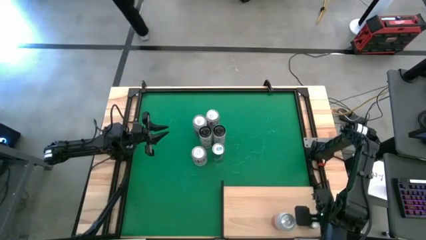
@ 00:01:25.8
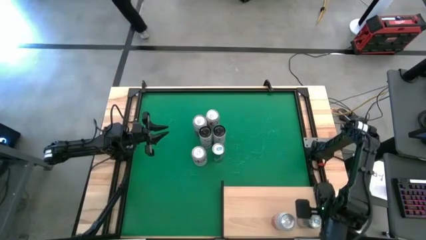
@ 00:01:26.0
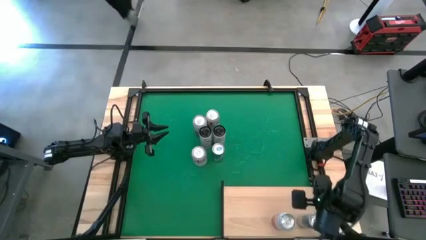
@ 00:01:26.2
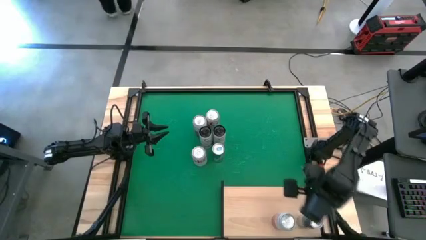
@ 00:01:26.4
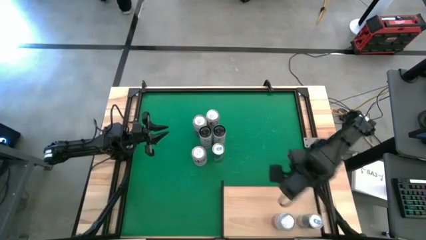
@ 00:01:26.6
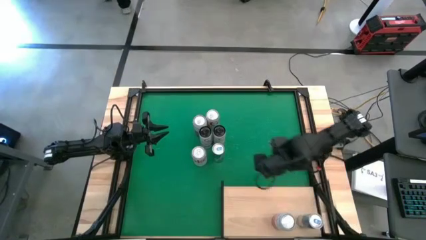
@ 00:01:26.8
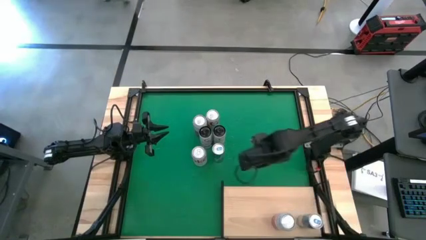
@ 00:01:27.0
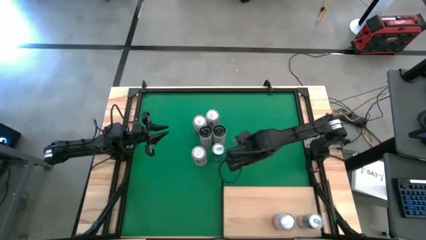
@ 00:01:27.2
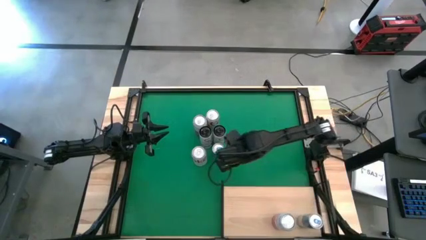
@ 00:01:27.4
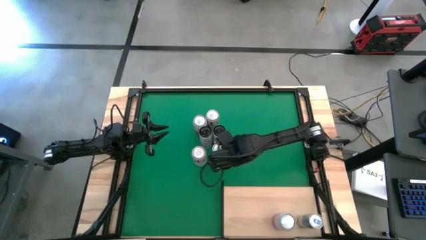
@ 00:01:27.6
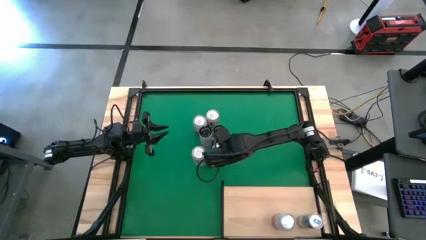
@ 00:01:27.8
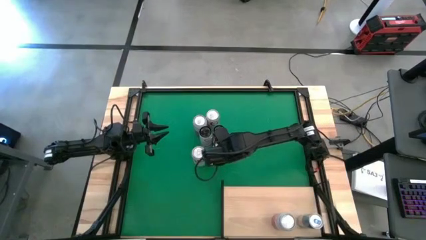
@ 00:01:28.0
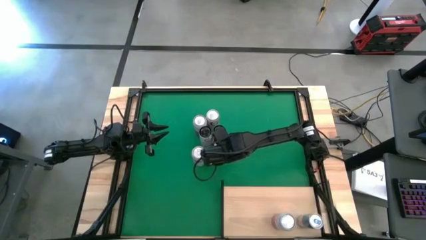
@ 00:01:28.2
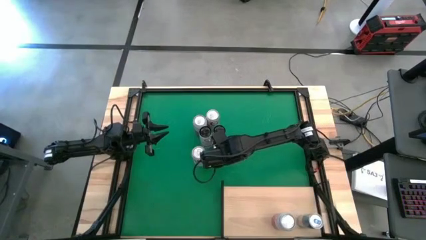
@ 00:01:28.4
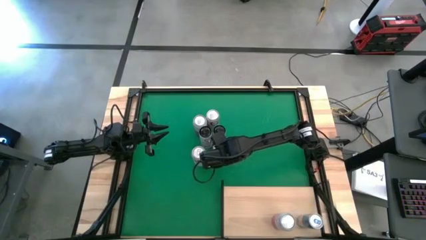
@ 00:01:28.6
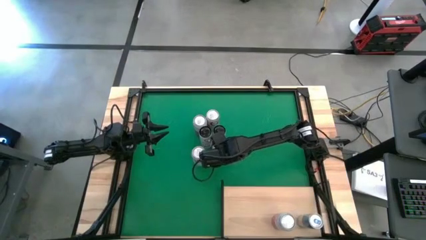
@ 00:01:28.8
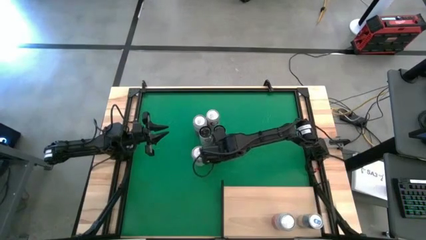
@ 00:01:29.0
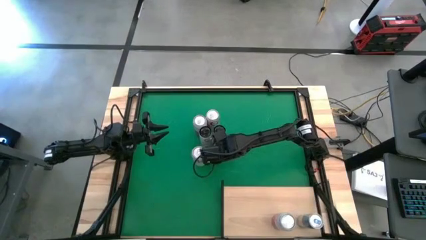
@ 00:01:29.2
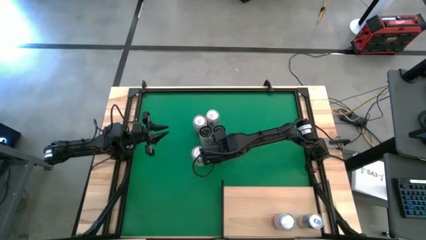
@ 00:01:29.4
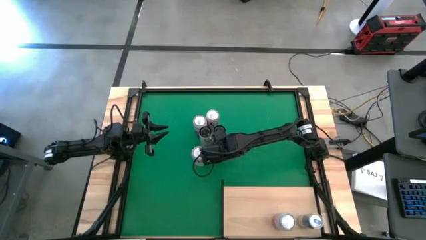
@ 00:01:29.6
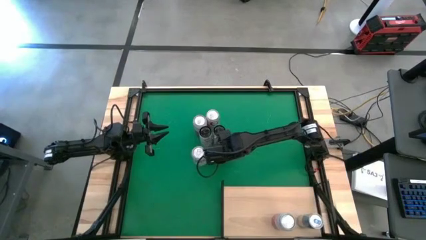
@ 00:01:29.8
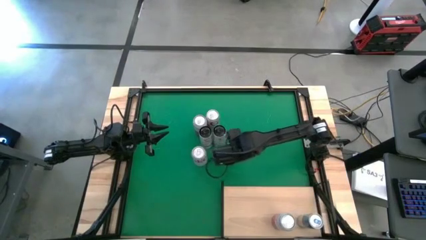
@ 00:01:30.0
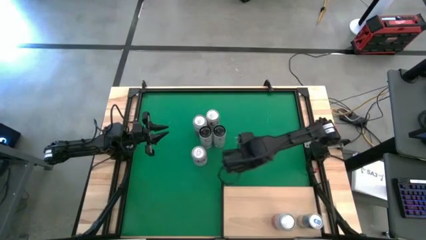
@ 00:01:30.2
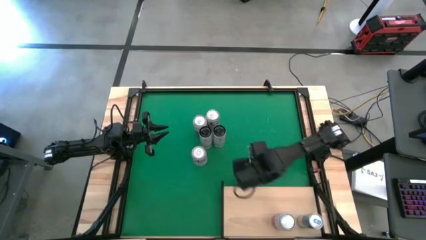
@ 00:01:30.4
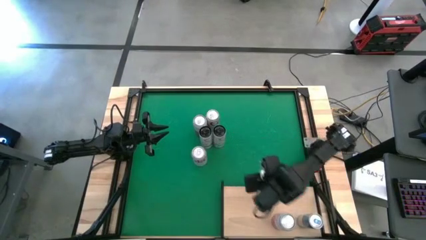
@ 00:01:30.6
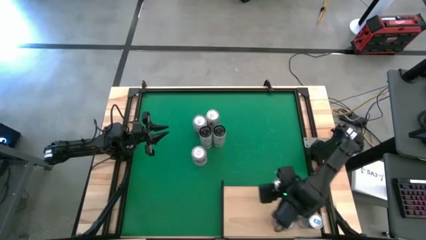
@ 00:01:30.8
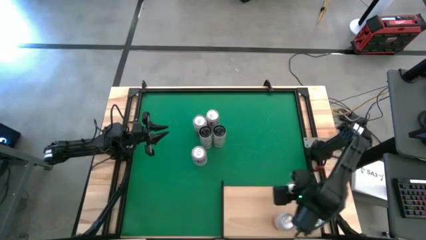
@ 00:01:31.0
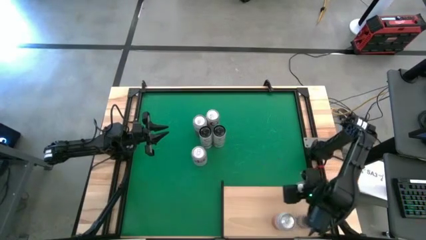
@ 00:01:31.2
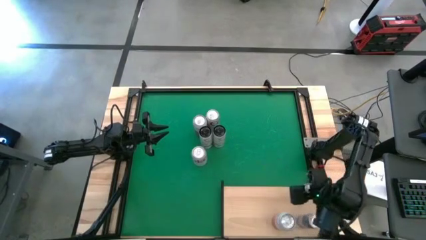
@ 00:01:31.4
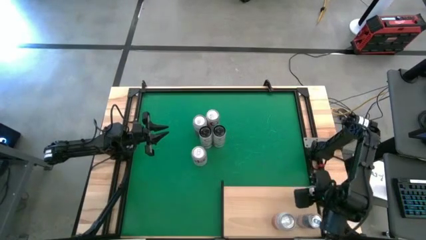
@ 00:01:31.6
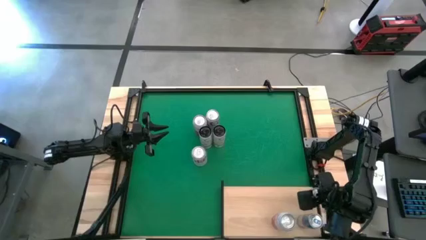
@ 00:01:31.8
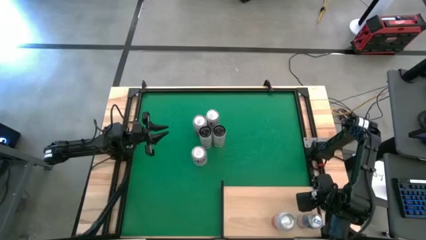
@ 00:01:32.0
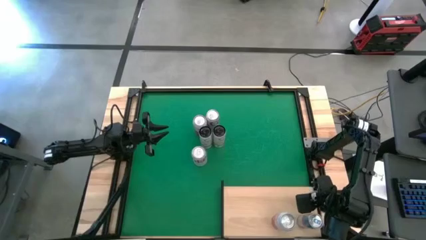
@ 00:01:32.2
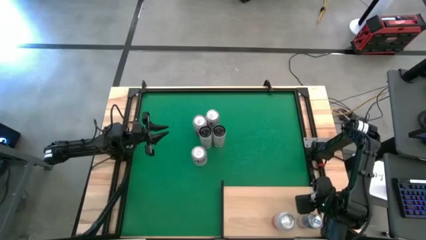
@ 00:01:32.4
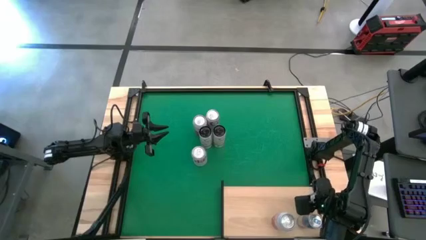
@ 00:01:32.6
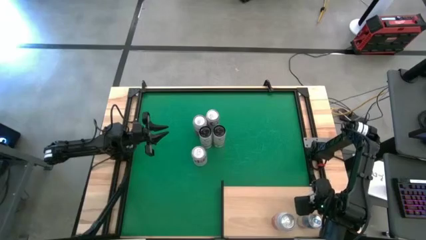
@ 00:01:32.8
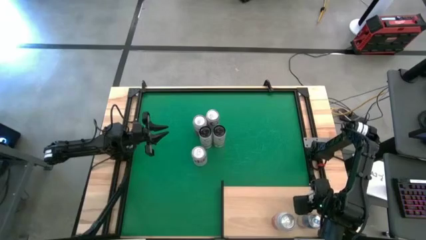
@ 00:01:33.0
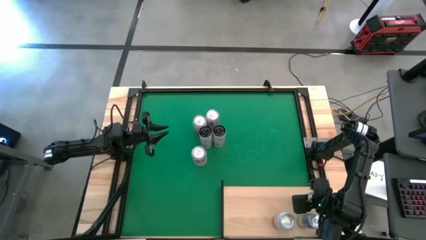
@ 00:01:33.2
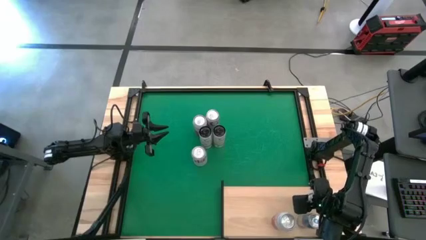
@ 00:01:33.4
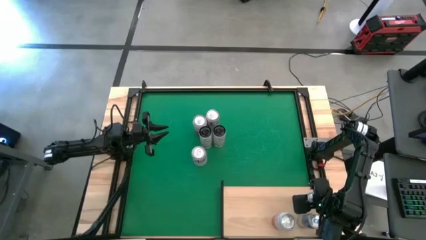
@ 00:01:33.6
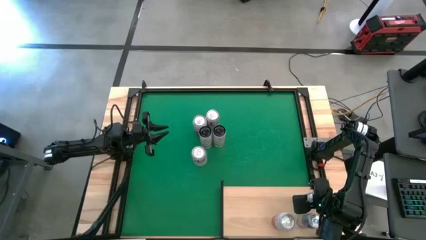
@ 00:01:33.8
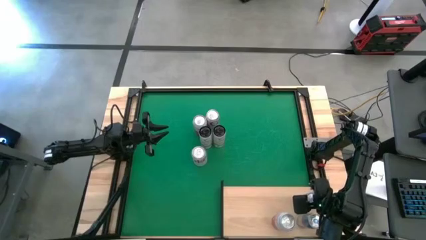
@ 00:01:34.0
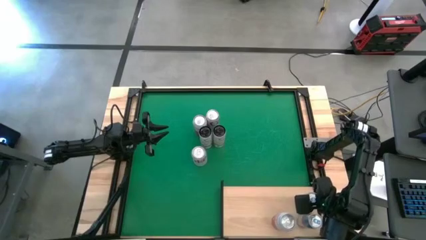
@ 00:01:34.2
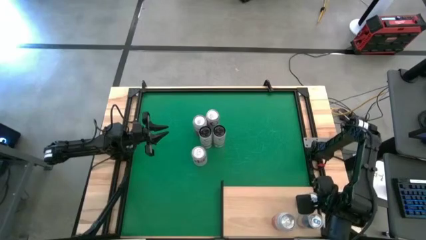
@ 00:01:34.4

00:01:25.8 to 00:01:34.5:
Task: Place canned beverage on shelf
Put the blue soda can on the shelf aligned with the other blue soda can

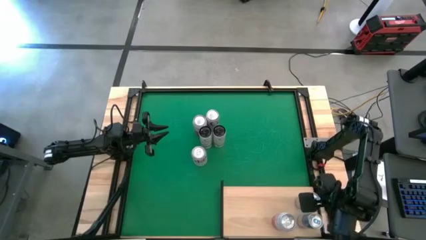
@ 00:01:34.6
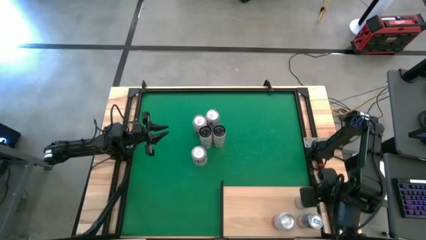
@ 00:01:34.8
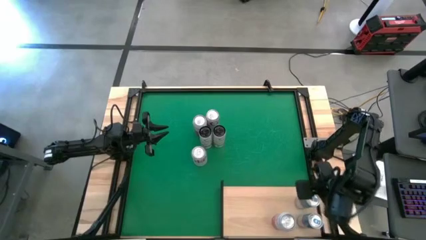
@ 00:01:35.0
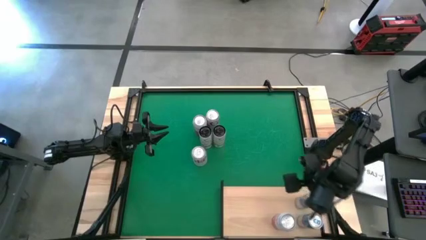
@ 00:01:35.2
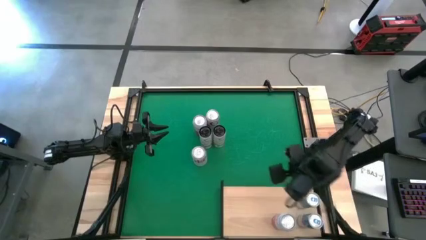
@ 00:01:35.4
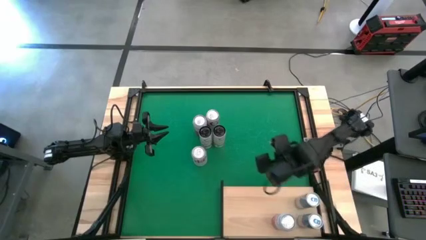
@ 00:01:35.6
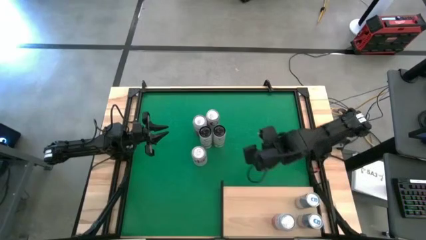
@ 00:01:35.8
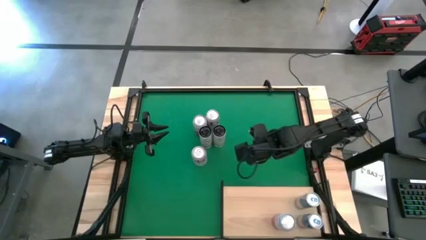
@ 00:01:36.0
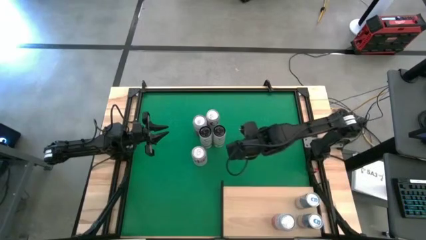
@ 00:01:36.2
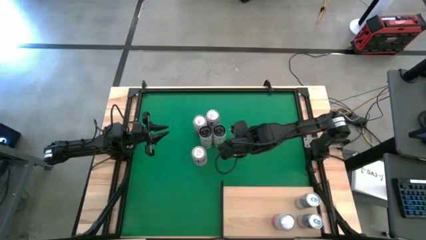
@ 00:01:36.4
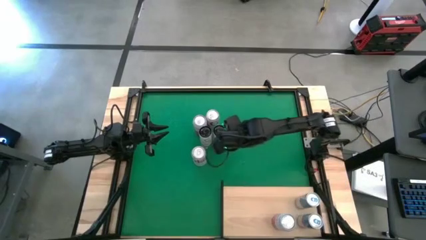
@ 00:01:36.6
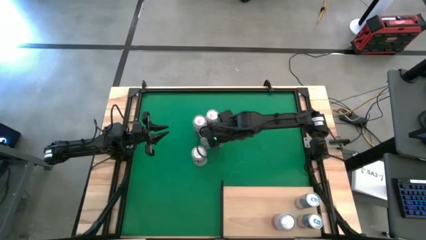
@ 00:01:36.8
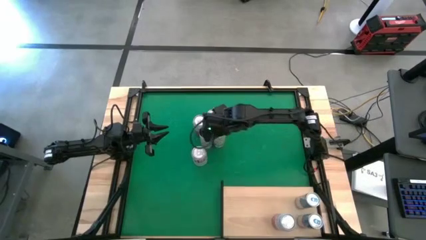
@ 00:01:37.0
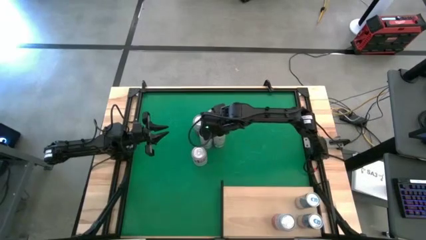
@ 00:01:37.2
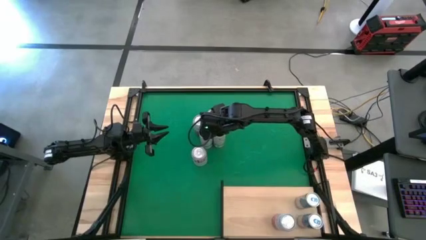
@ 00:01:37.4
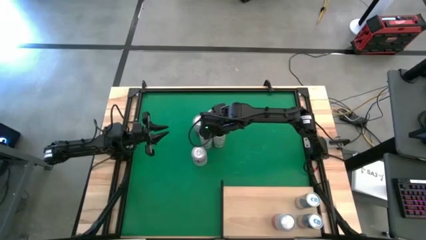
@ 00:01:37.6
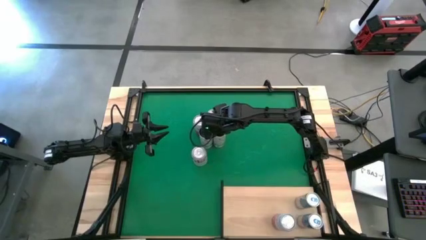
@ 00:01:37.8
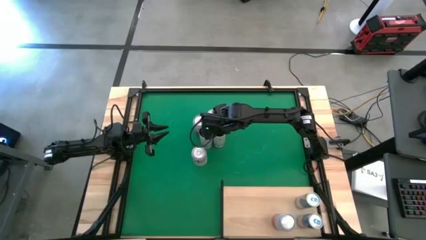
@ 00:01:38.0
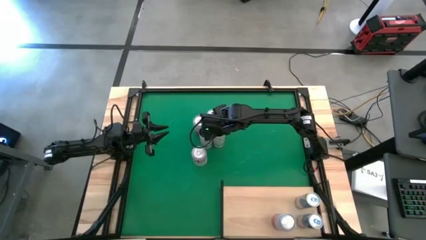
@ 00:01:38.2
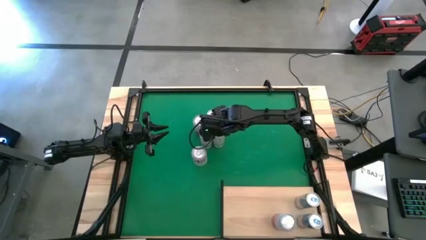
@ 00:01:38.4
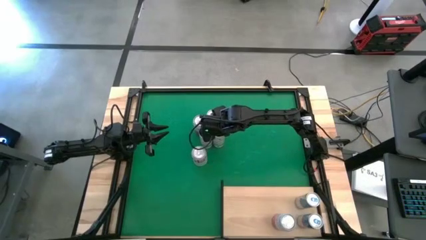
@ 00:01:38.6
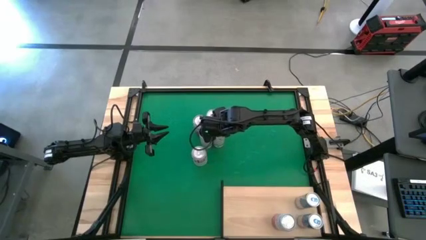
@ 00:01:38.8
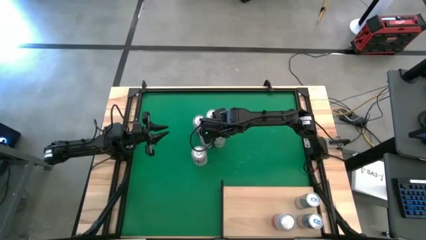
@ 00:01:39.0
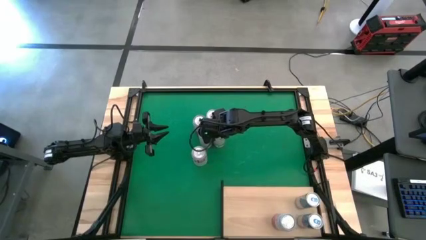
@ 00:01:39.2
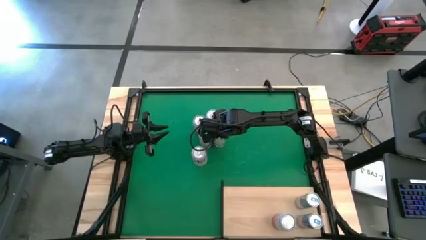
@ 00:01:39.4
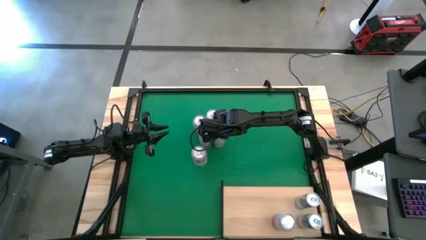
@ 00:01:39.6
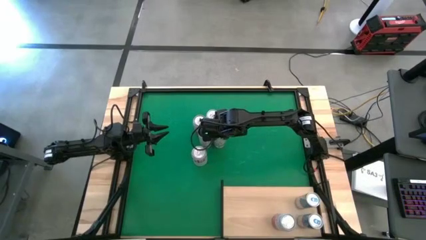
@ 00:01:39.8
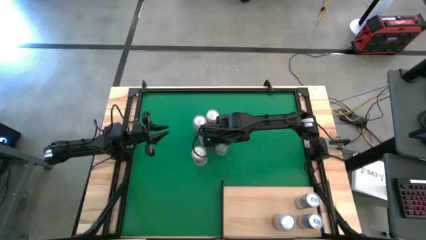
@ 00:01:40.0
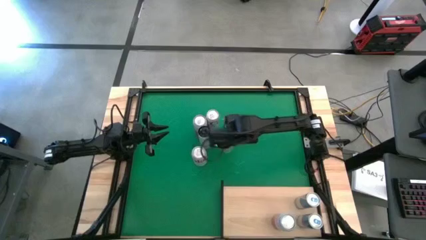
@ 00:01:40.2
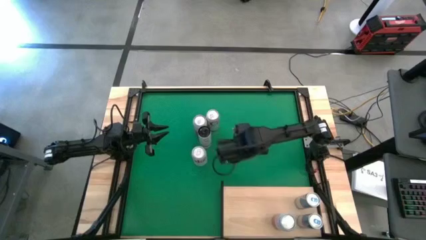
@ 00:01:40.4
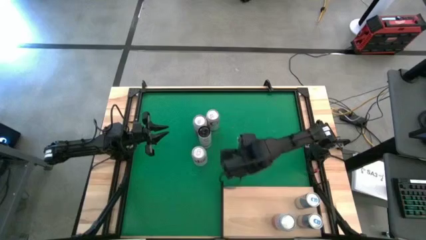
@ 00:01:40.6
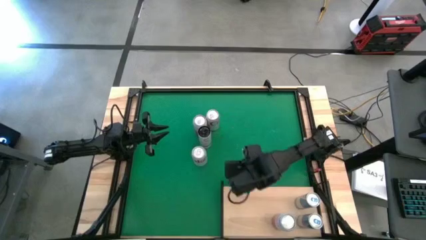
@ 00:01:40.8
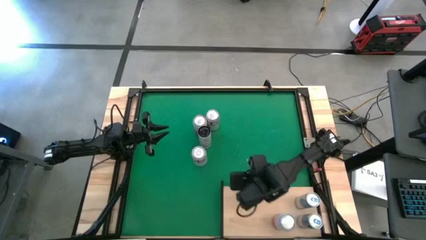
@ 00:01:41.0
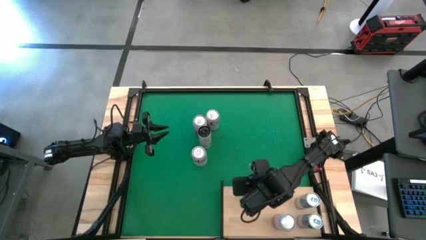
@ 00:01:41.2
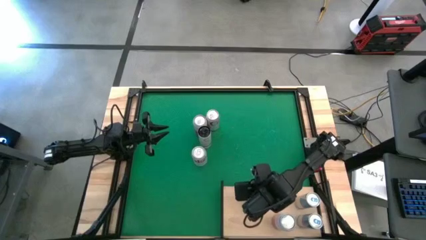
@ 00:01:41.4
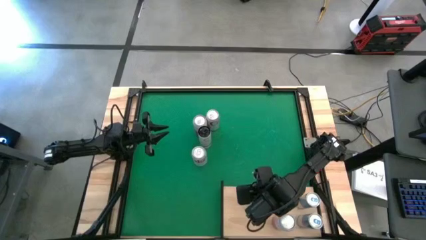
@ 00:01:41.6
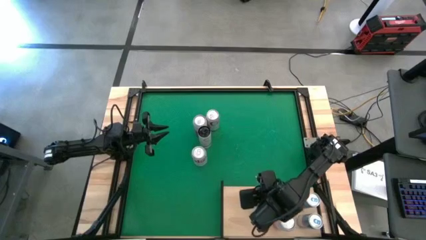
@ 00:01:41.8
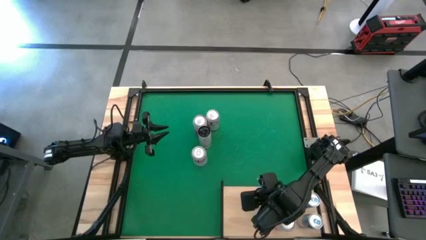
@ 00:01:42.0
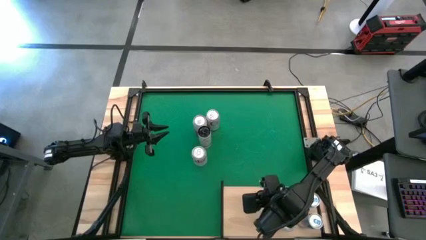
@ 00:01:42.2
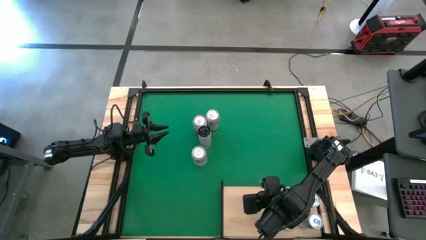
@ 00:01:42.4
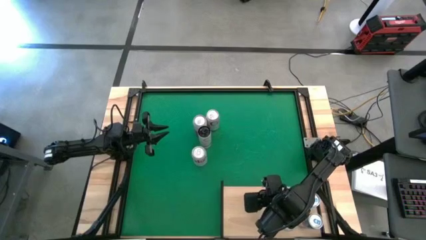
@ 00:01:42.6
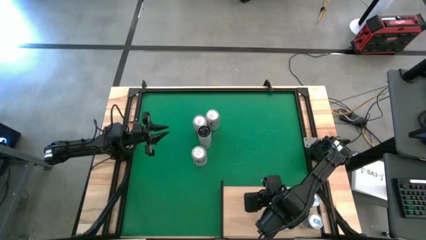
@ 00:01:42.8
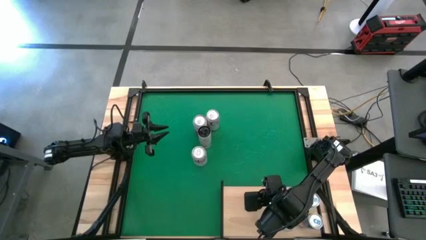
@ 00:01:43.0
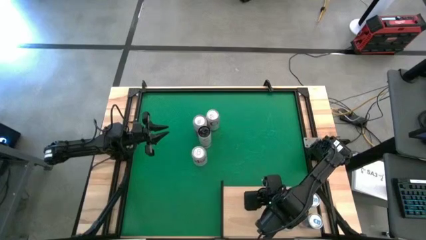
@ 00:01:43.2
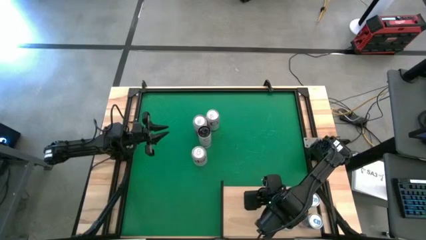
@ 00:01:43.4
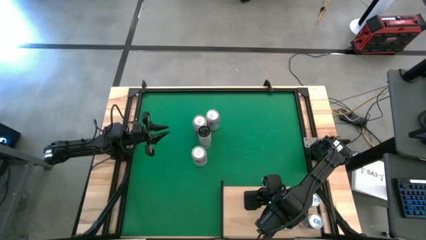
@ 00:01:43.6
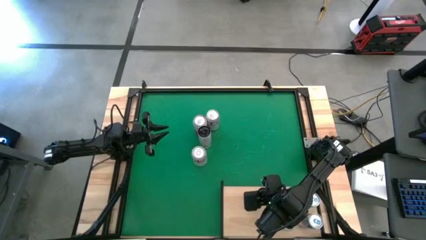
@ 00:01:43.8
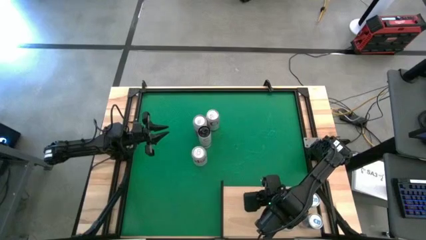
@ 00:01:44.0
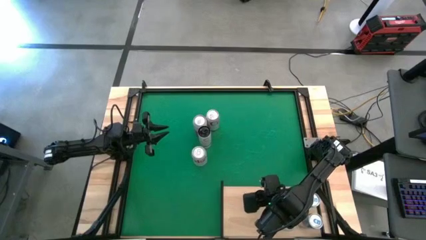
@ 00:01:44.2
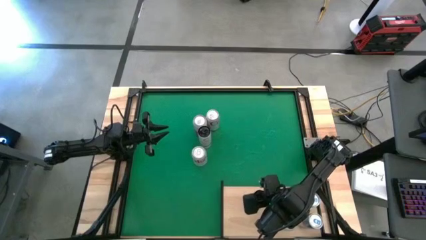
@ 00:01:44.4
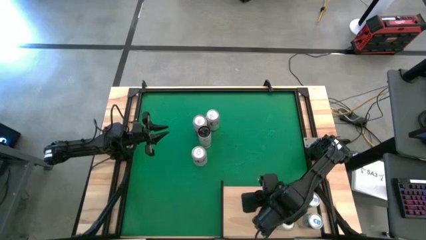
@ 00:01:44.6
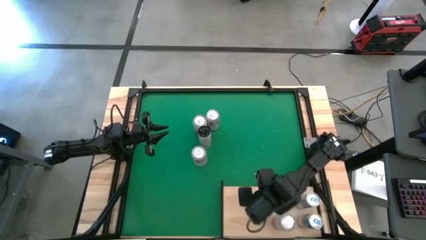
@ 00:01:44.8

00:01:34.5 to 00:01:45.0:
Put the right white yellow soda can on the shelf
